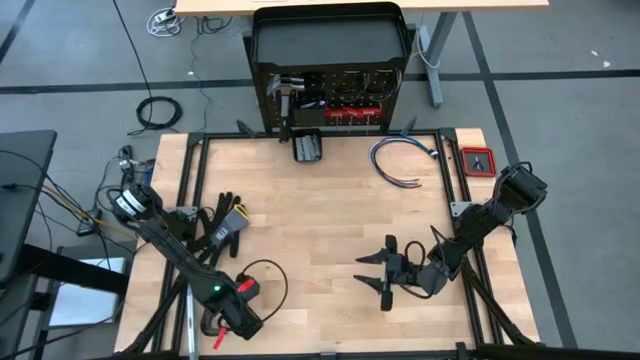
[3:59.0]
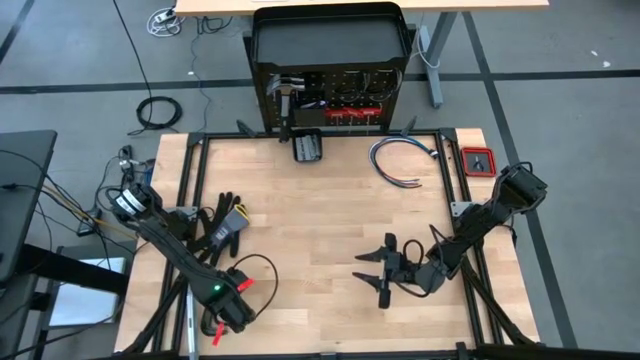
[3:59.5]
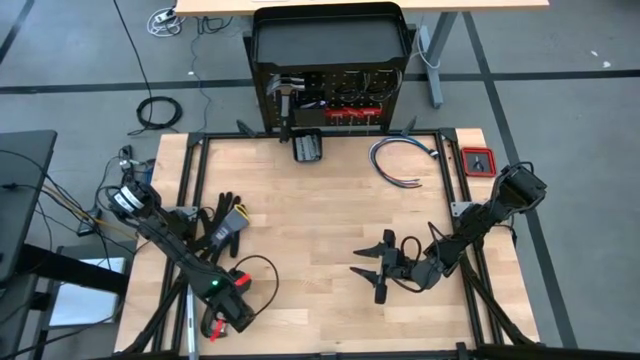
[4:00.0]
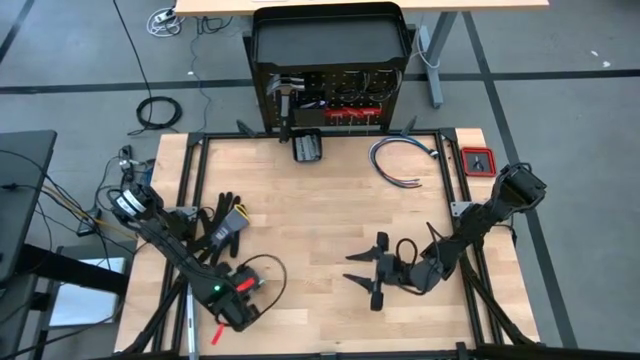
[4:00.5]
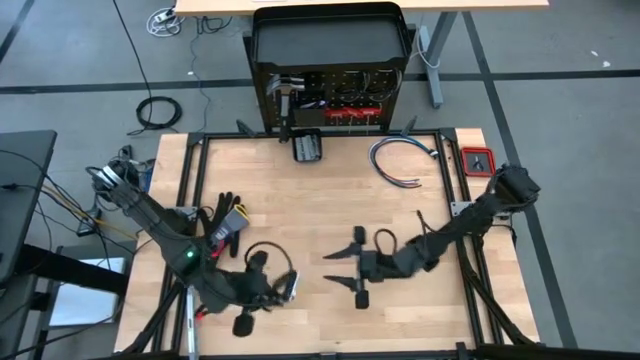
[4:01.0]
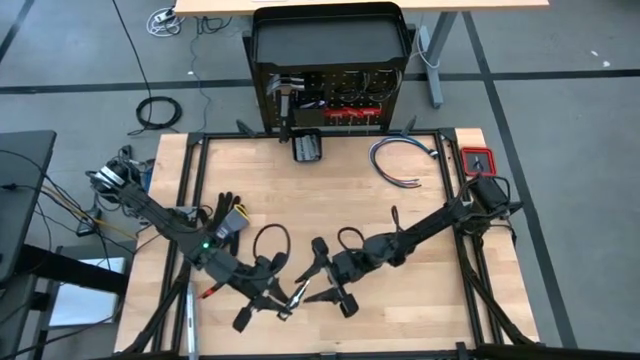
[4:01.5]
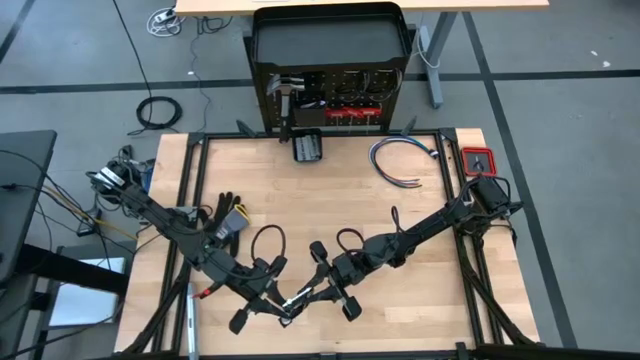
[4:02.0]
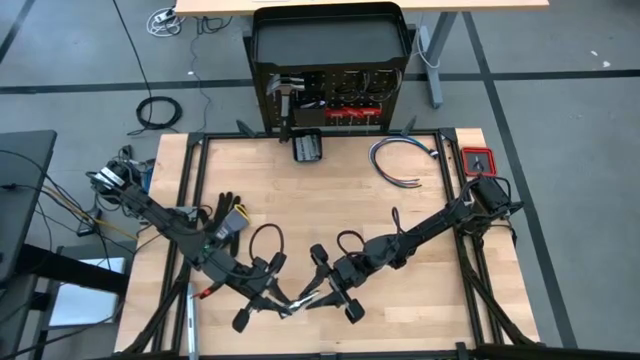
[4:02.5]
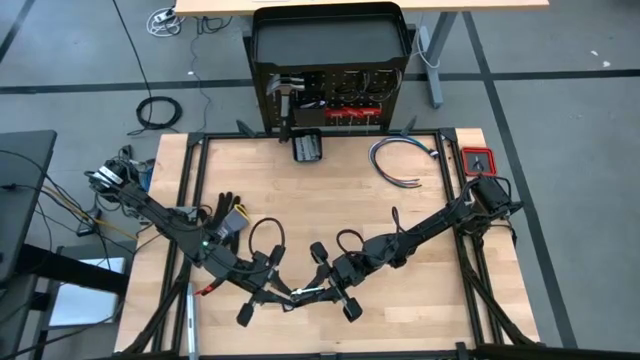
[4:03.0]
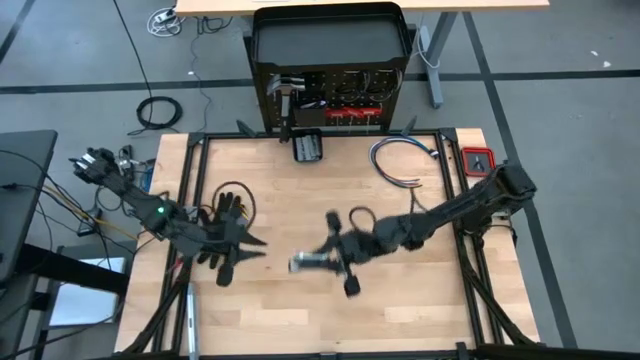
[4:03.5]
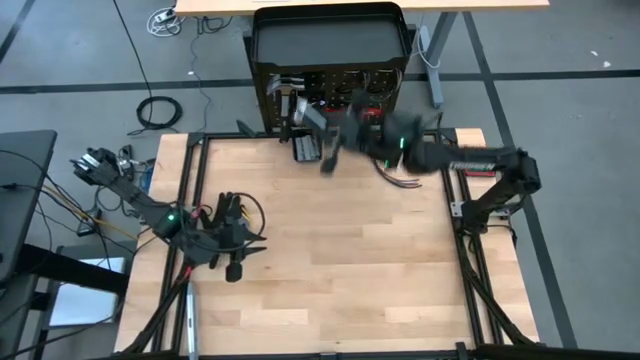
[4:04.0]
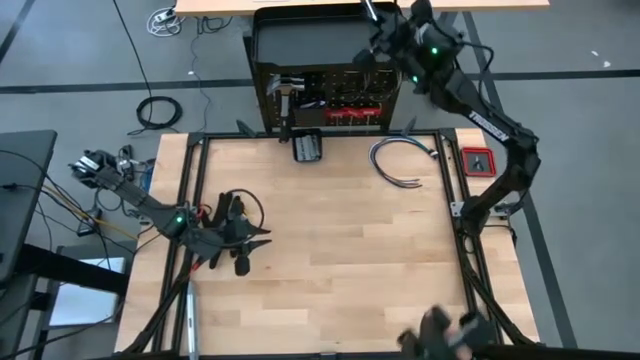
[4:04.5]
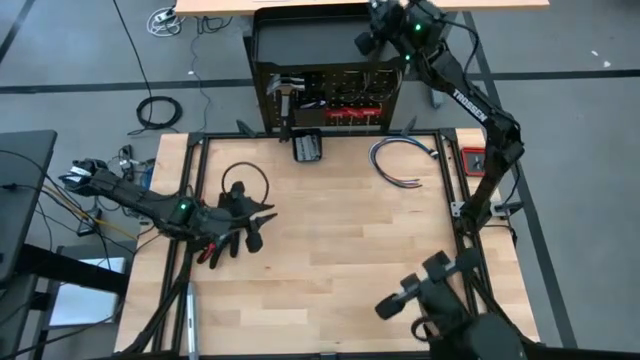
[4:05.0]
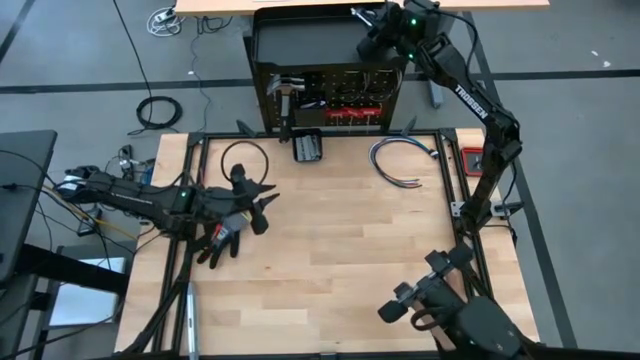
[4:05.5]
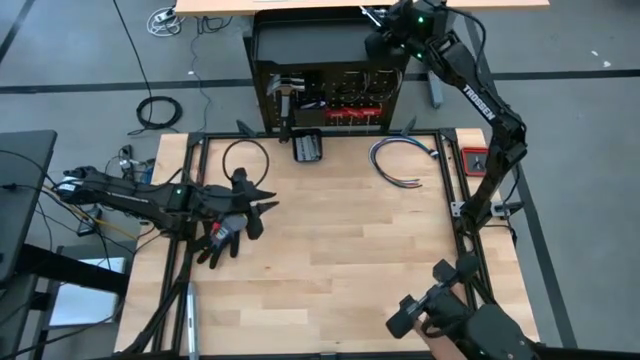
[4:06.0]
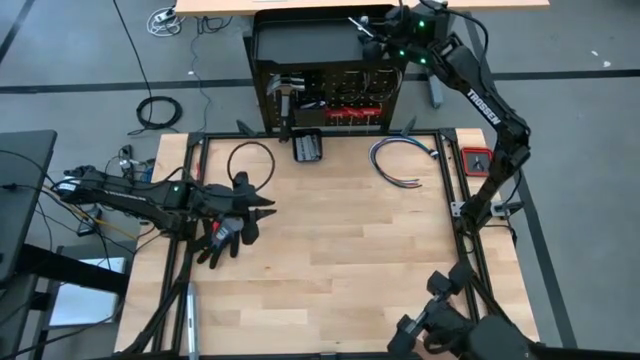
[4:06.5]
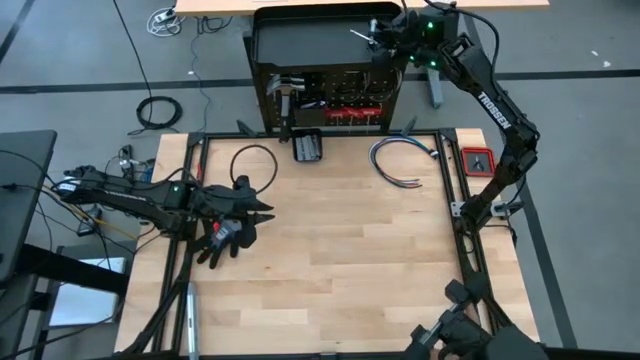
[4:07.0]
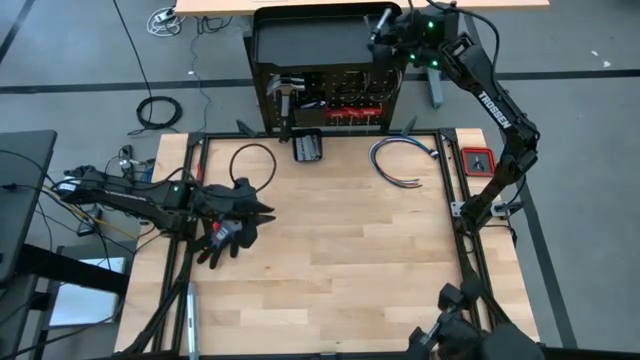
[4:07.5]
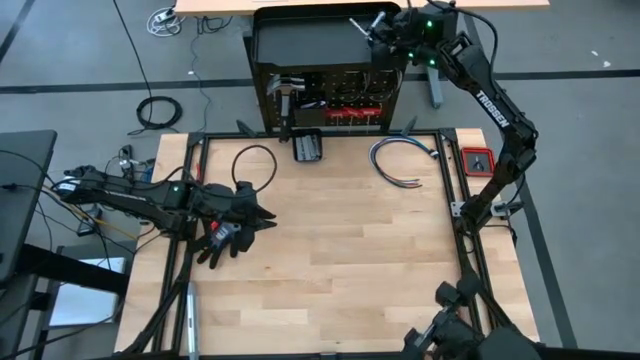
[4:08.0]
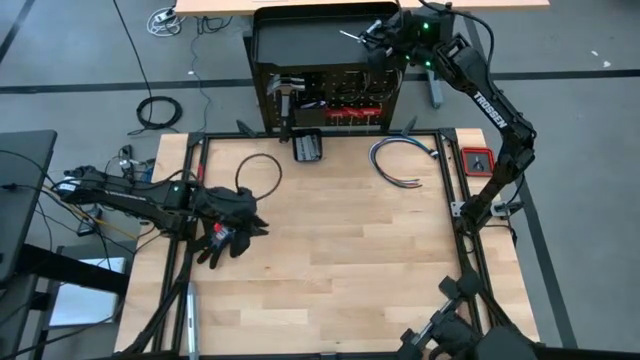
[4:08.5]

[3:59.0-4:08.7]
Task: Hang tools onto peg board
Put the black clamp on the on the peg board

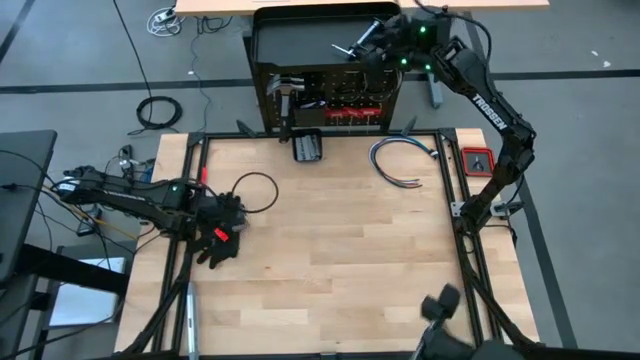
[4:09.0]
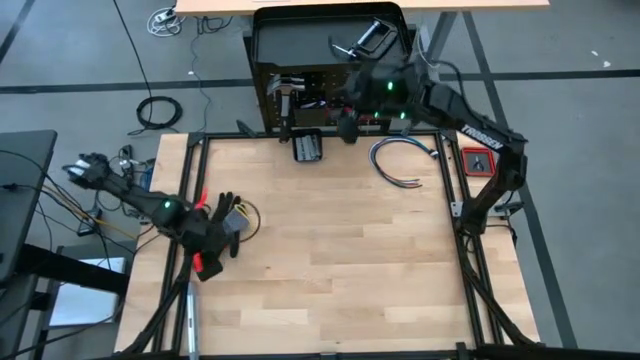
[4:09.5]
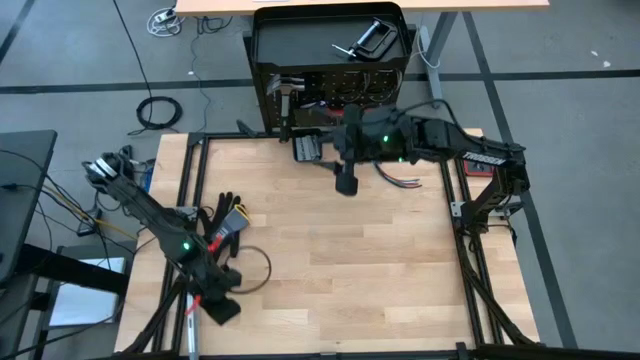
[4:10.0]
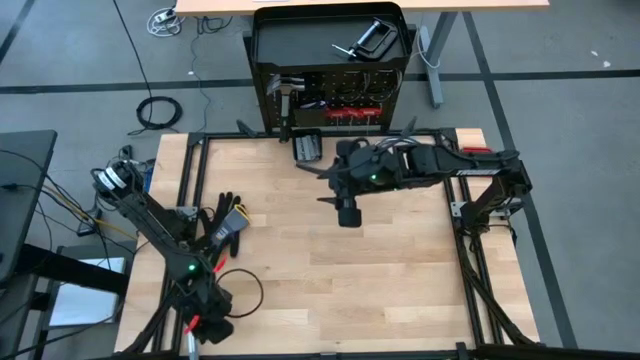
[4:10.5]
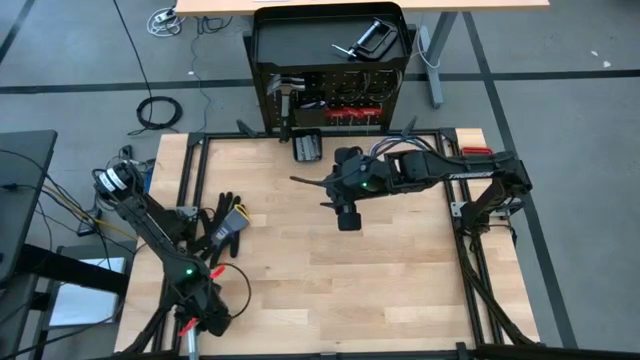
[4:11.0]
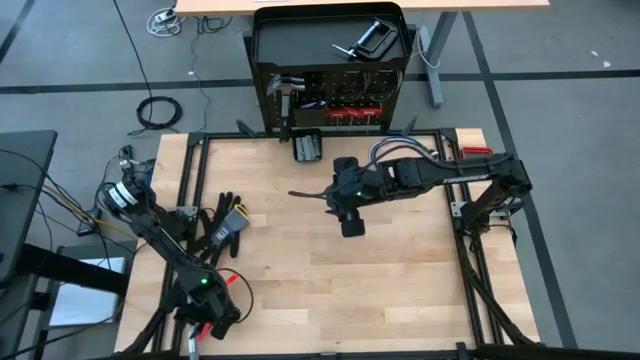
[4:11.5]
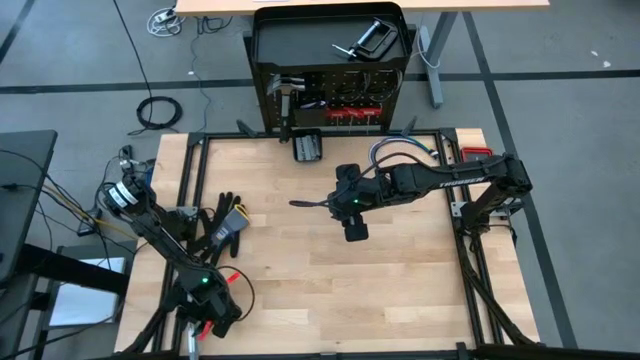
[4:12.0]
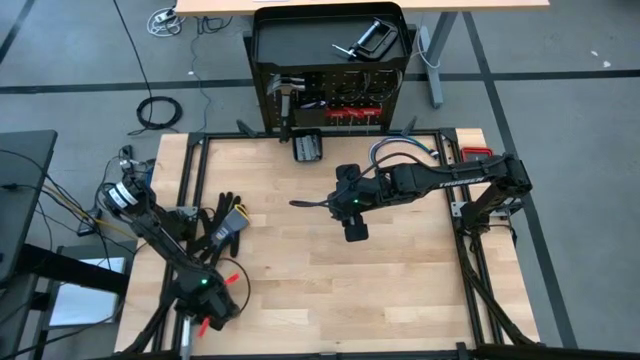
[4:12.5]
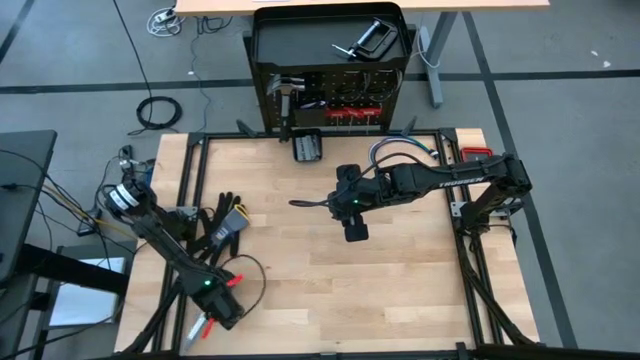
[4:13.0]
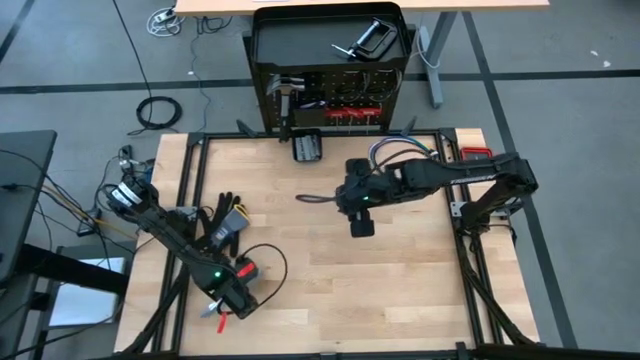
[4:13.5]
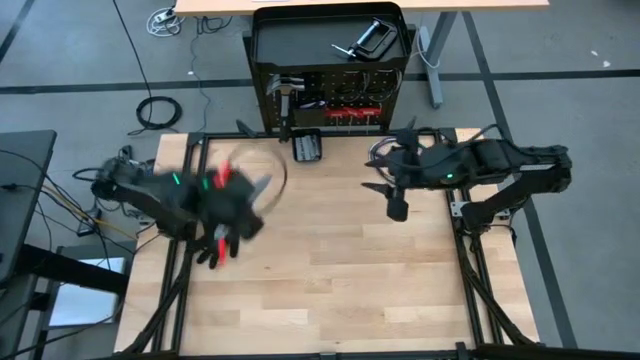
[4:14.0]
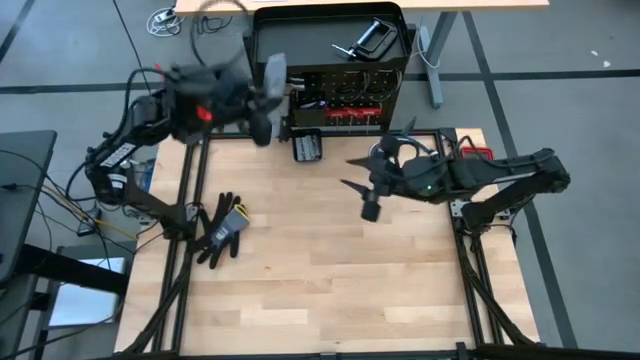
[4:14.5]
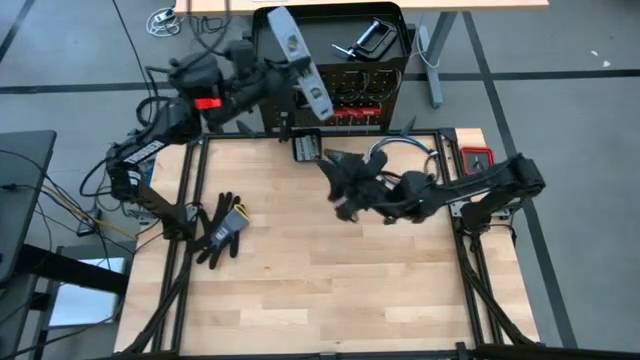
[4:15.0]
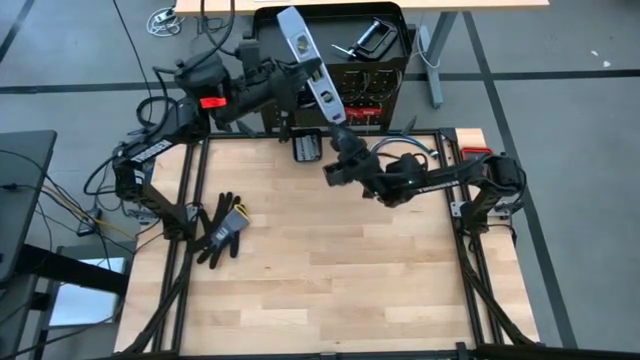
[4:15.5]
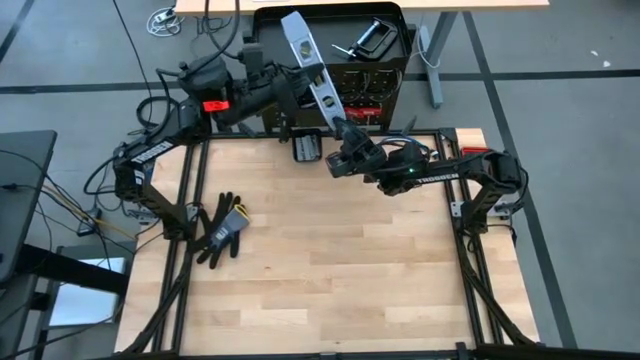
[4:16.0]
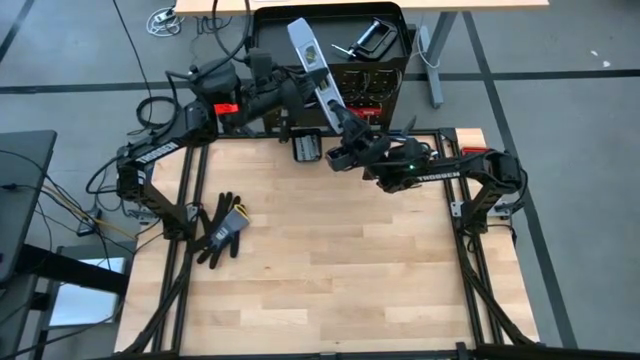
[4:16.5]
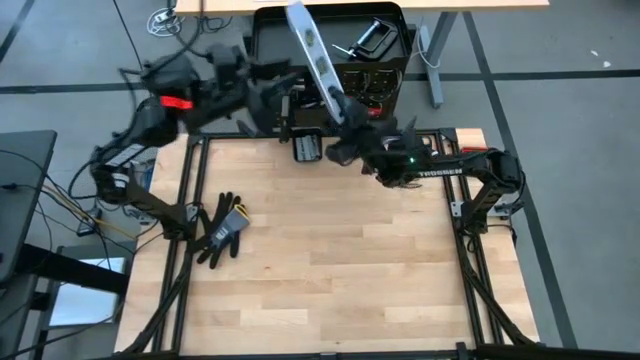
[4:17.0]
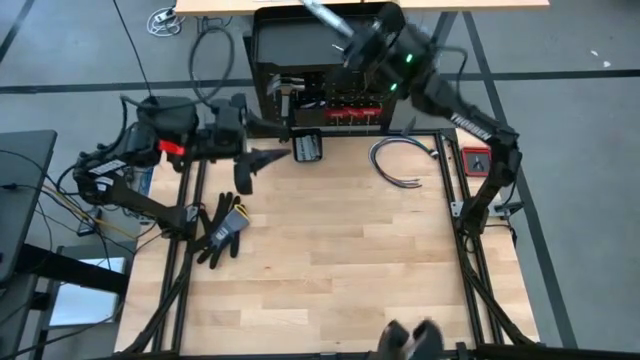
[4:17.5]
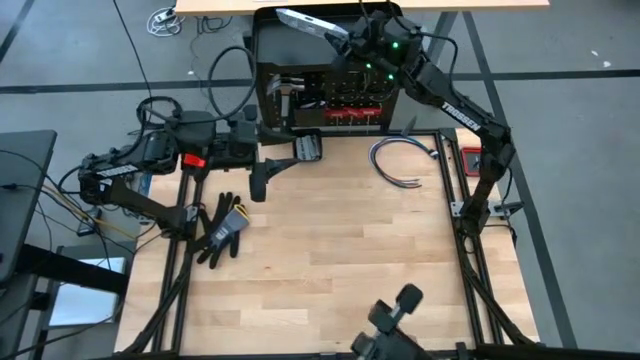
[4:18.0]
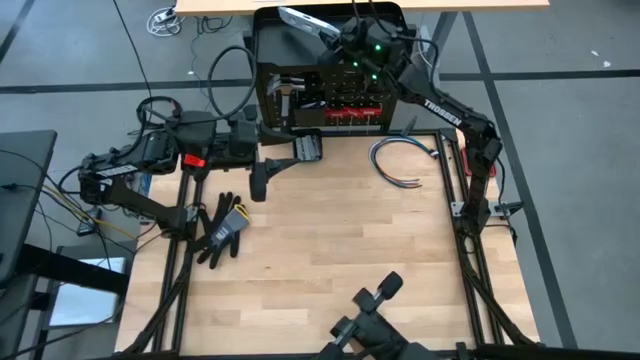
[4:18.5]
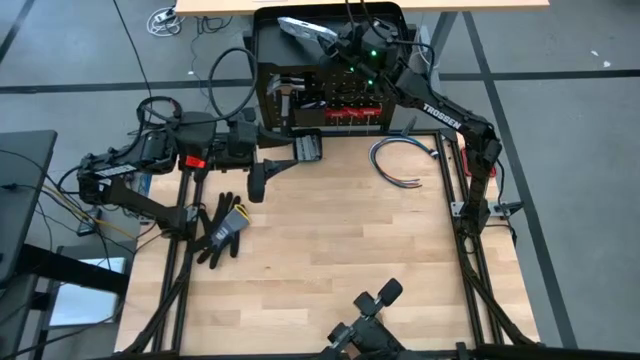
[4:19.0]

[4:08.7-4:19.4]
Put the white spirit level on the peg board
